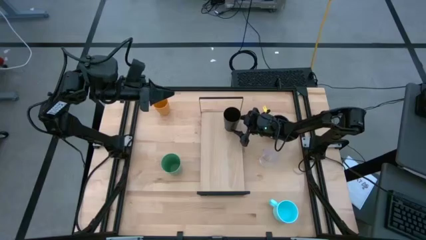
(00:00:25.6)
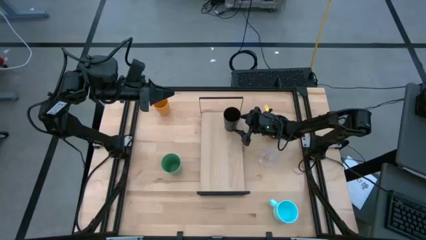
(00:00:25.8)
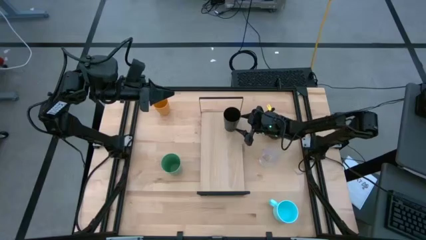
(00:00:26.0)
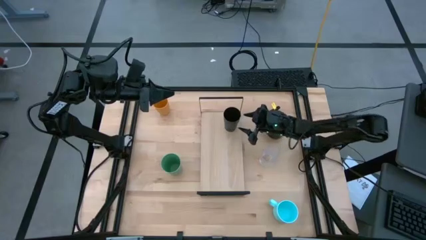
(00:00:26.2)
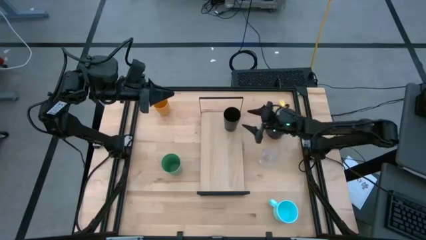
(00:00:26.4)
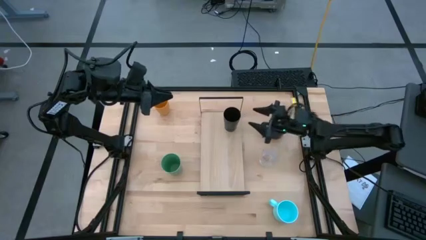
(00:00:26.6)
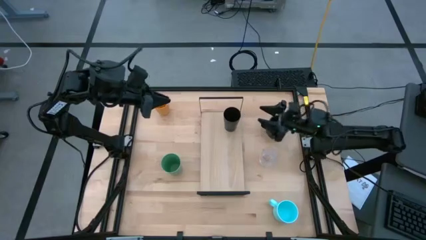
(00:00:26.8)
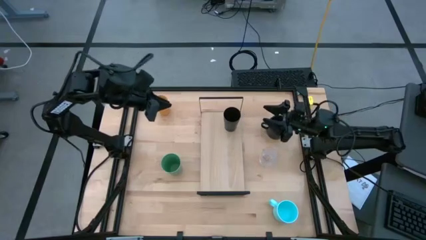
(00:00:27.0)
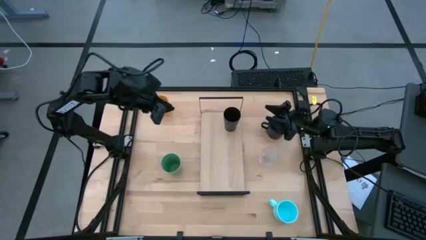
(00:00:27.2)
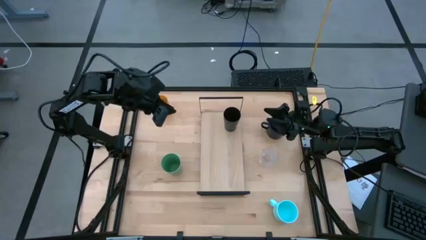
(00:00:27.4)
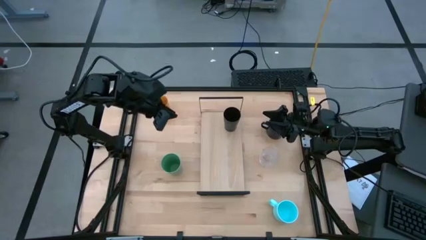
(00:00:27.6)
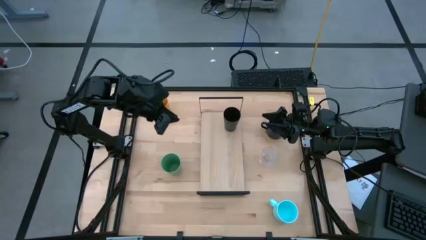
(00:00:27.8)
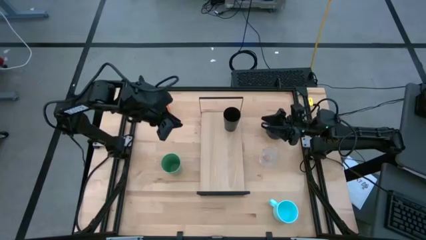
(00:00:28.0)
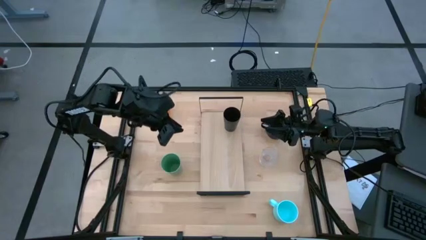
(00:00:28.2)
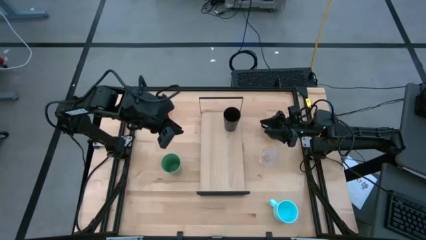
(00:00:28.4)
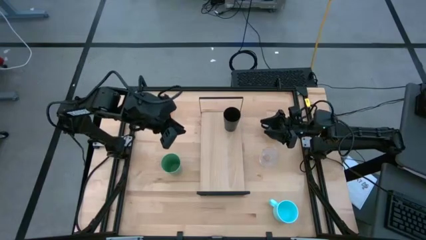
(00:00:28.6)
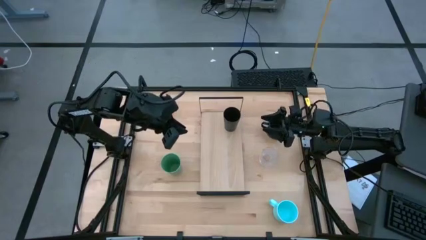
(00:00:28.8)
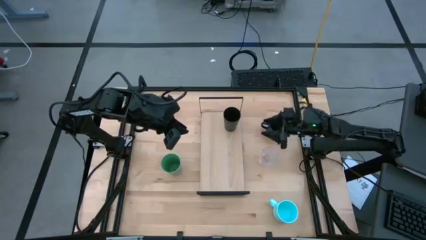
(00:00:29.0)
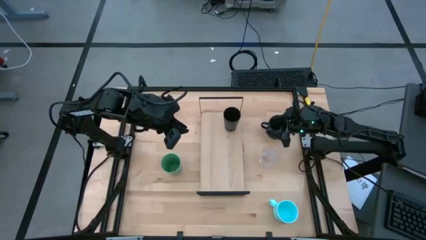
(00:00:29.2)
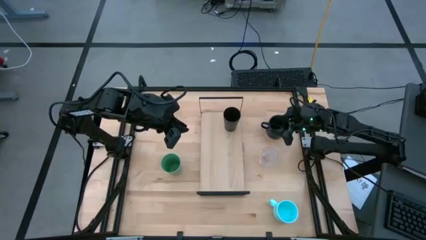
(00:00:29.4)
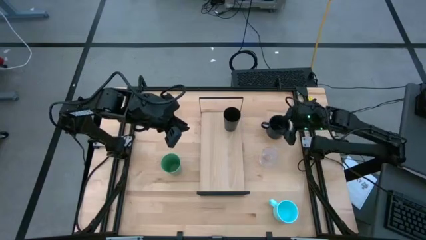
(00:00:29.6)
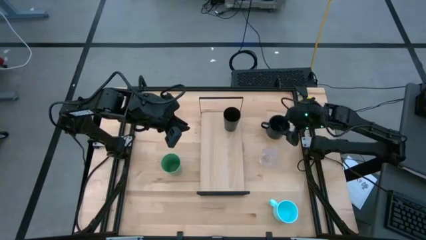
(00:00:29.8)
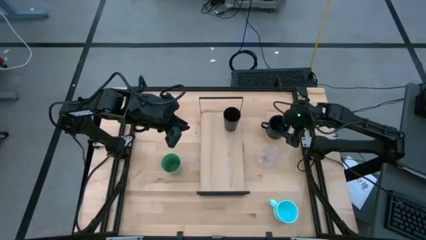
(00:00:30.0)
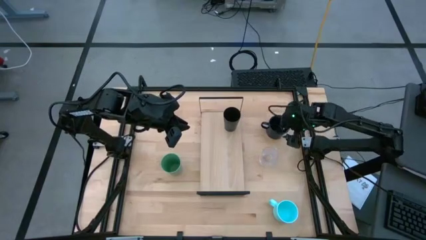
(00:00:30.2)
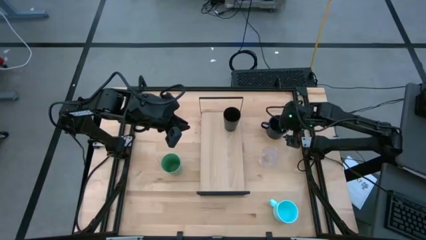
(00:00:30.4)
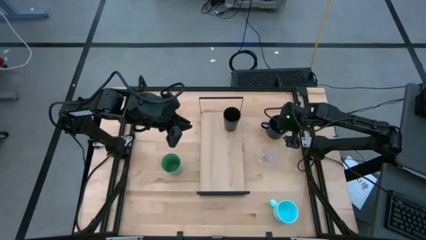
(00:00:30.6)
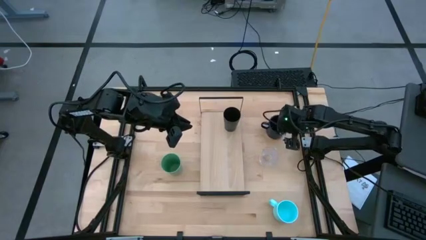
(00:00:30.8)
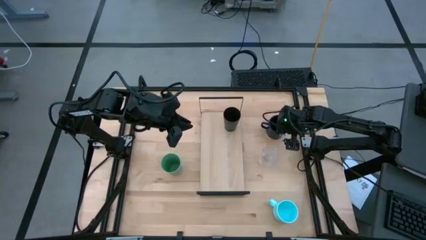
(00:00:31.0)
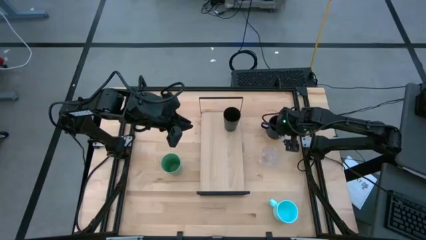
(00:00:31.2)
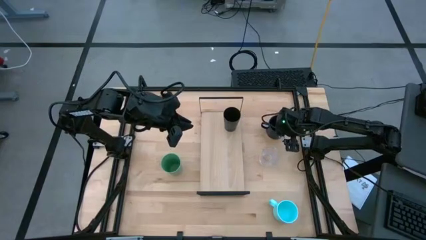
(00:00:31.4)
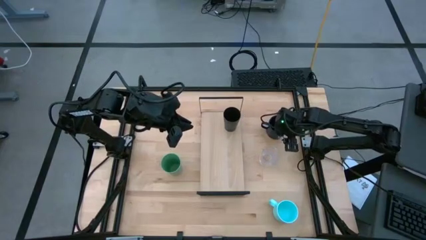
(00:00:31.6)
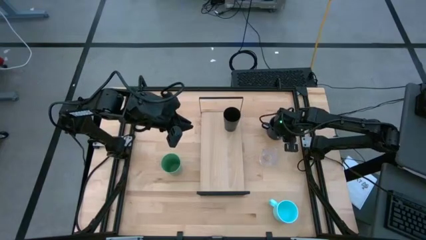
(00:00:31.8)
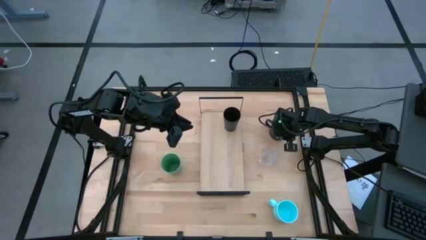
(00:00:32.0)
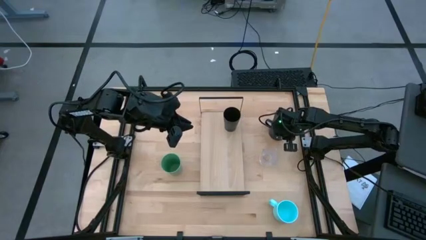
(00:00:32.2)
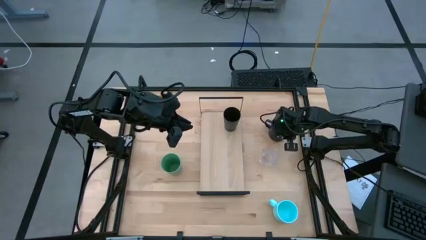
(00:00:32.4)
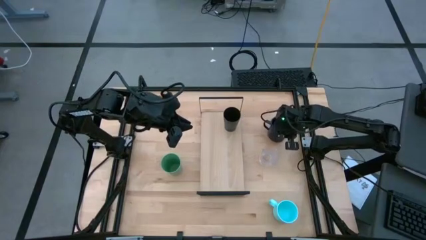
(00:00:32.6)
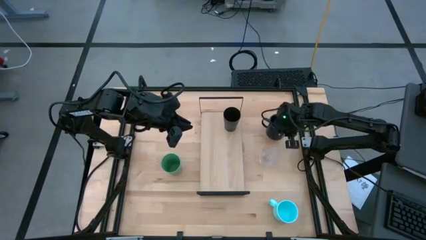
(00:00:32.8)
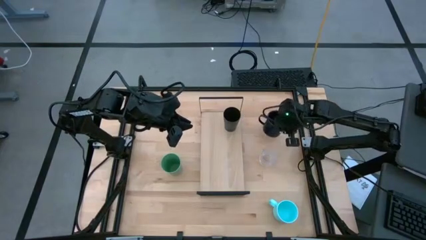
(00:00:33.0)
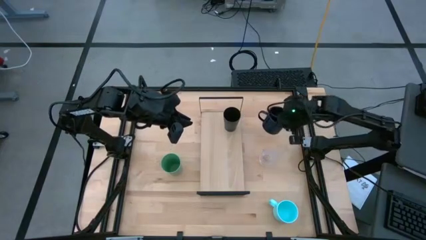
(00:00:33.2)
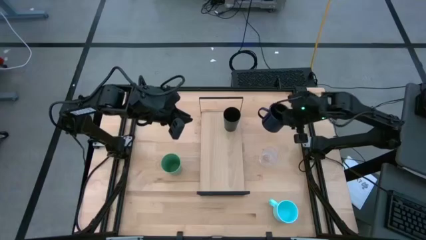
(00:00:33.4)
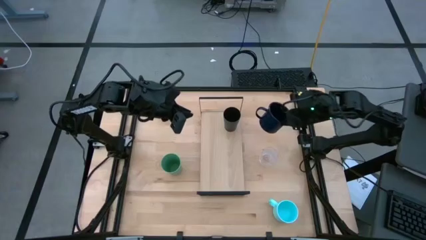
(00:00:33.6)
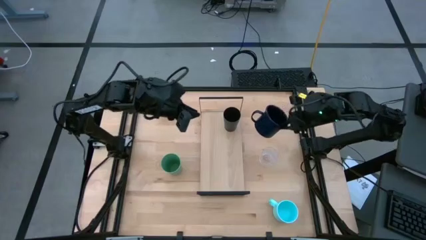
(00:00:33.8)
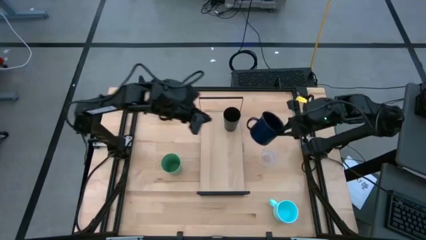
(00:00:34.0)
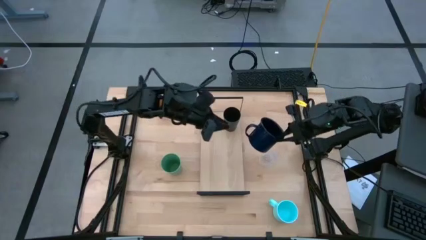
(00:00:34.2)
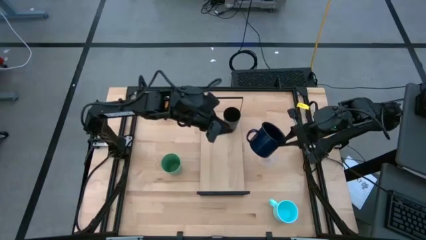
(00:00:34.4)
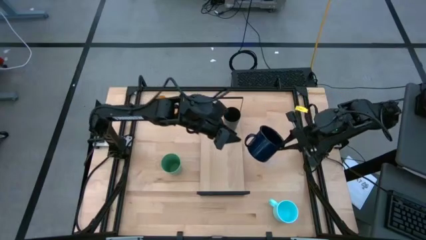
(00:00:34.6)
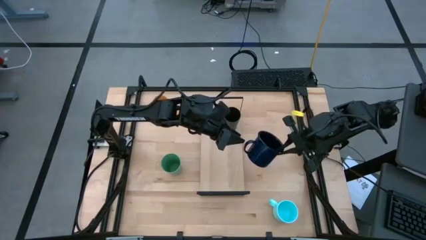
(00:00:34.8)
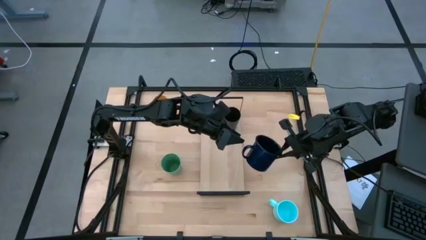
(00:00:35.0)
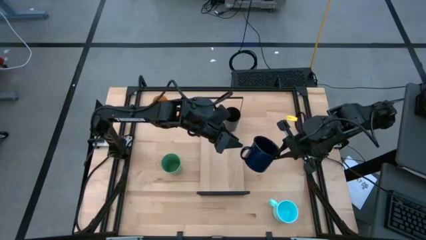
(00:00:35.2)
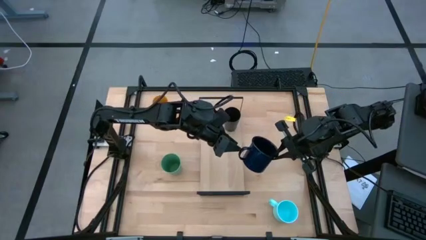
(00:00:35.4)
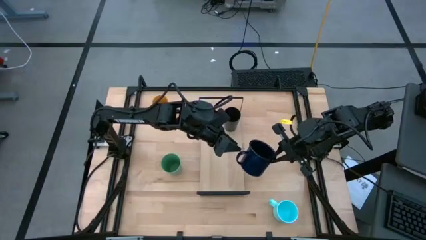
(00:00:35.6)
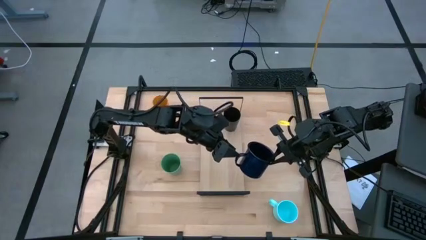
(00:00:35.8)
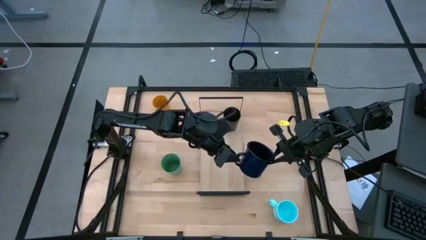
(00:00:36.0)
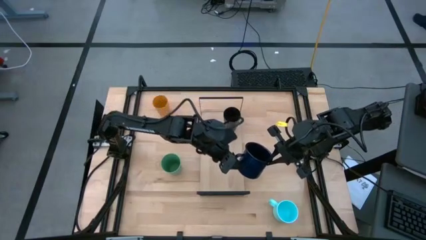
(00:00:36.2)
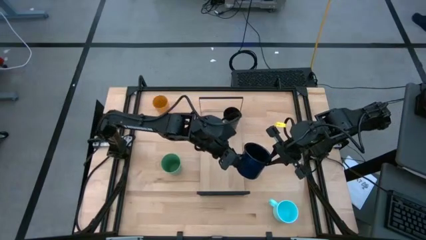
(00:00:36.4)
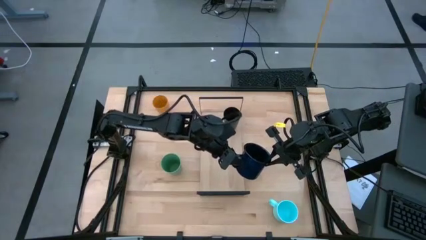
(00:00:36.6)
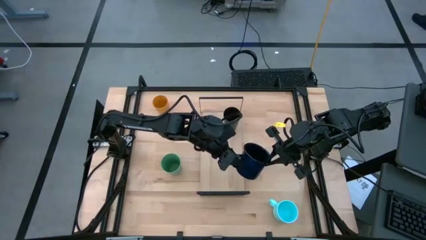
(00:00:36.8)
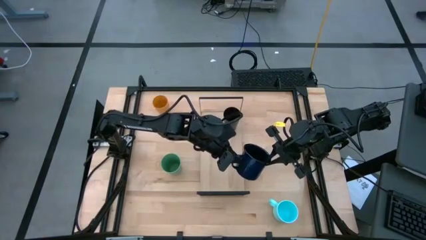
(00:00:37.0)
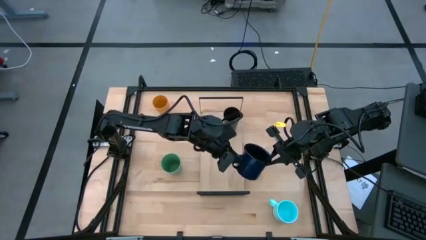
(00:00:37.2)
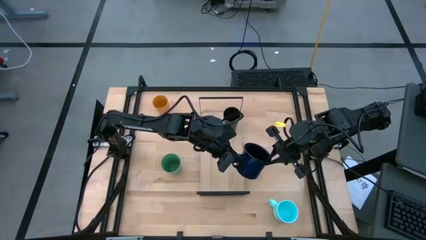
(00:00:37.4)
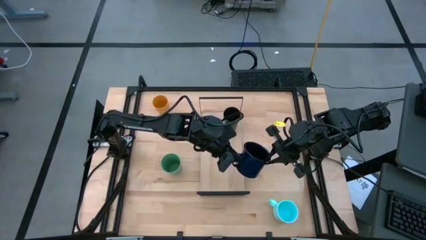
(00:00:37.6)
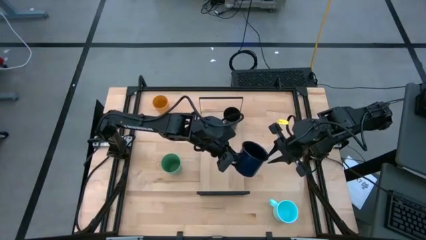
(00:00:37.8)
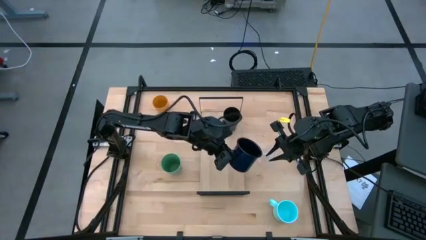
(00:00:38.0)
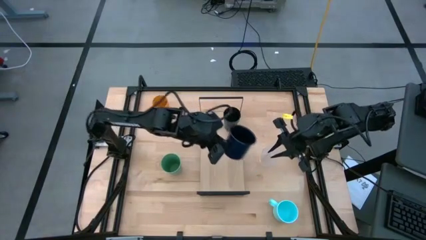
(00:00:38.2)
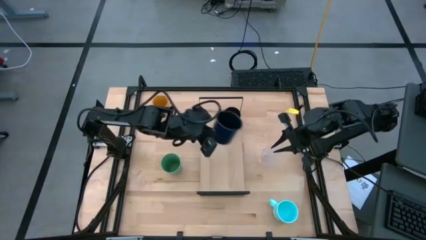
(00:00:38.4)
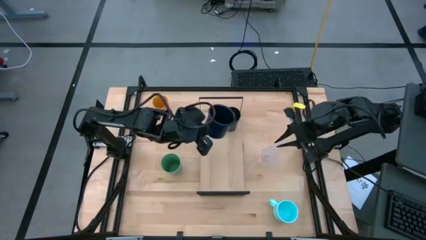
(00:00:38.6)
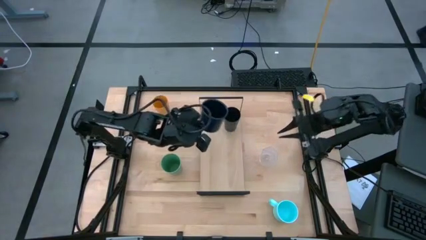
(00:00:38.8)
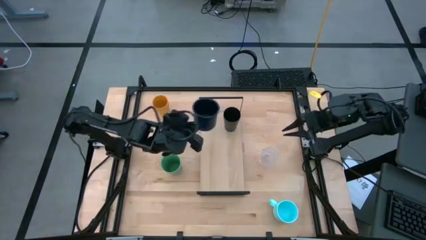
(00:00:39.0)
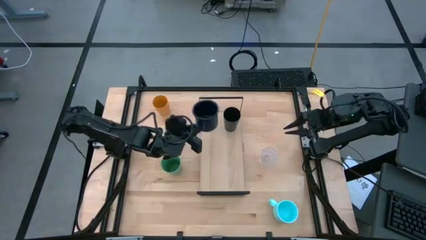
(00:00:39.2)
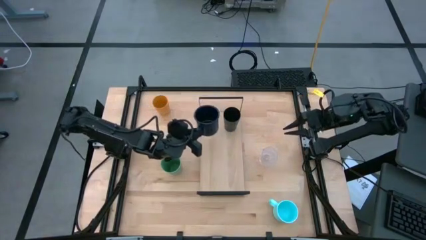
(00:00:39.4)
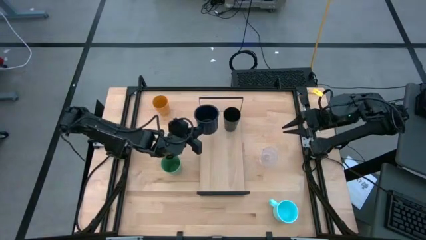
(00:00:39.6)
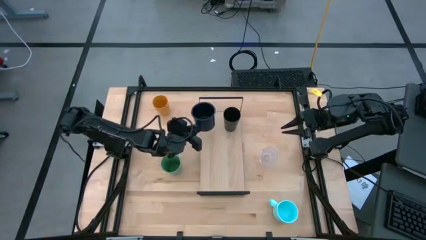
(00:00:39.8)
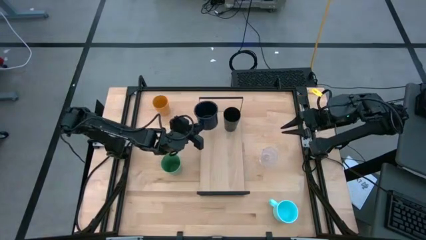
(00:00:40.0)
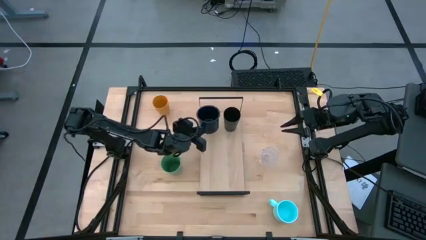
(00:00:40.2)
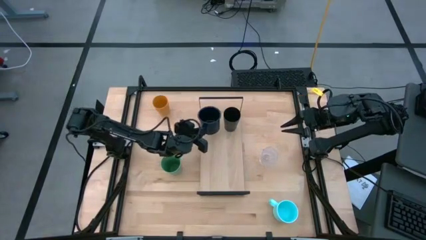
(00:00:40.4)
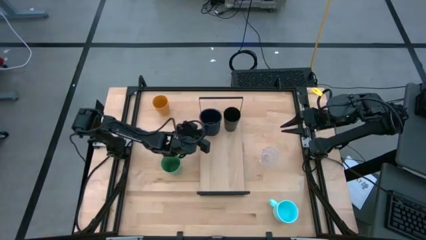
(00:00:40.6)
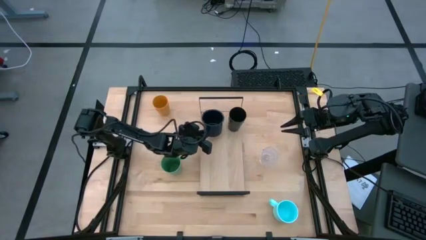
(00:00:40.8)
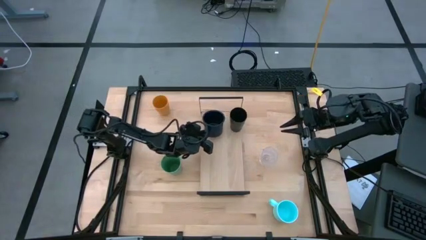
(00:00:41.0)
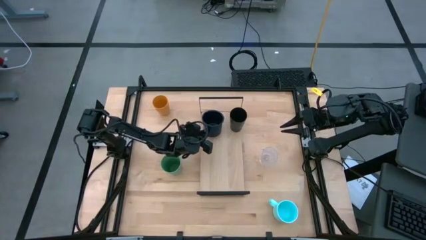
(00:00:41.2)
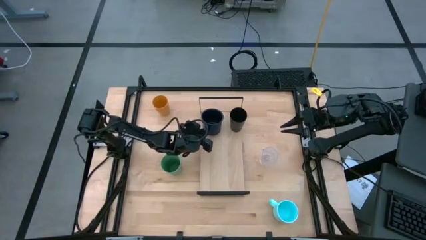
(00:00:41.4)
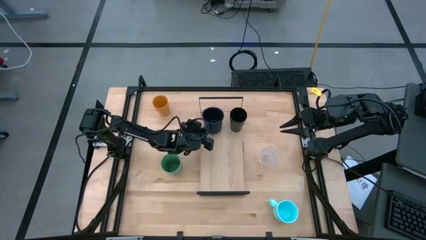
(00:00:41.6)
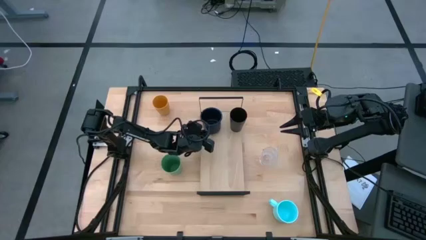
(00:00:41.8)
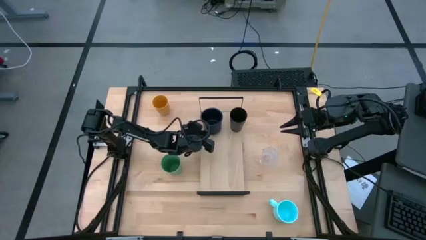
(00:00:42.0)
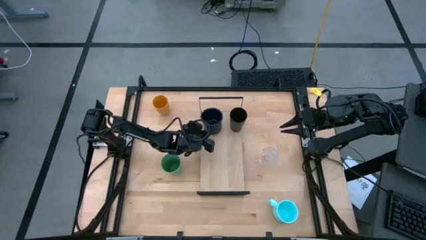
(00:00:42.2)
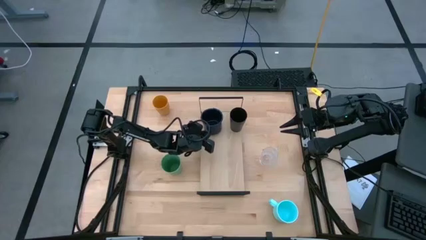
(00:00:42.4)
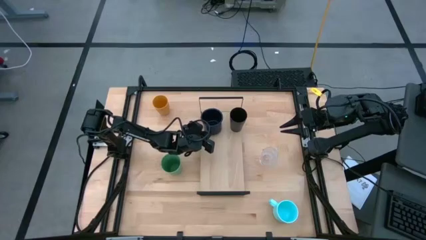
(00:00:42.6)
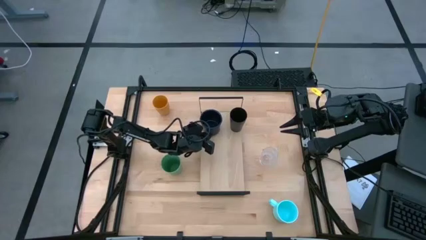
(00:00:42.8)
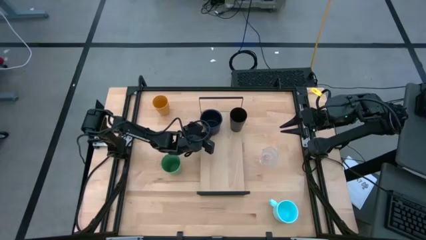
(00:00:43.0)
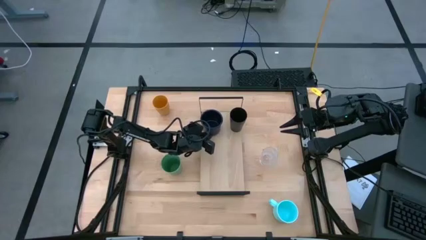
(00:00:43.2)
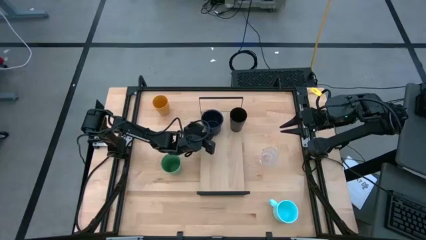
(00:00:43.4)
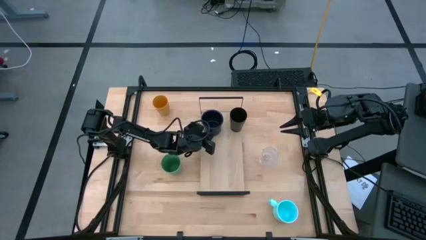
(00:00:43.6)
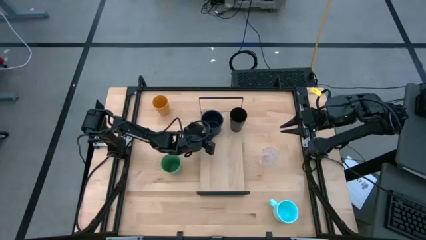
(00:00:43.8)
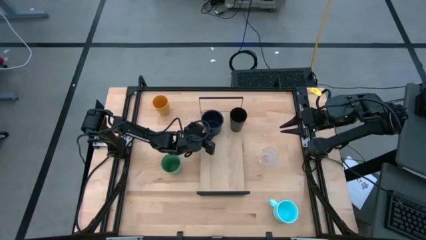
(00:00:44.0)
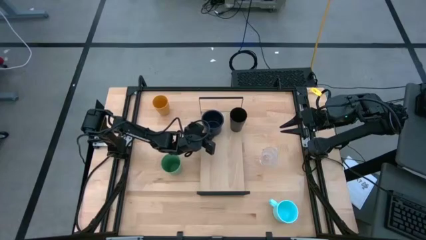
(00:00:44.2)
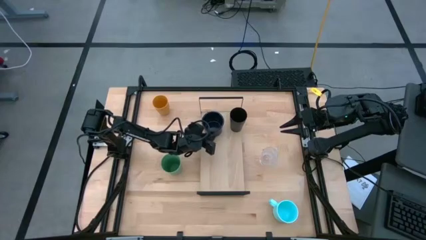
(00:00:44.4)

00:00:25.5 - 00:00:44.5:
Task: Stack small to large cups/mugs on shelf
Put the dark blue mug on the shelf
